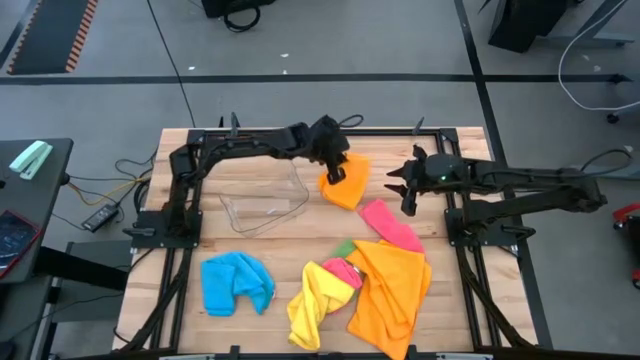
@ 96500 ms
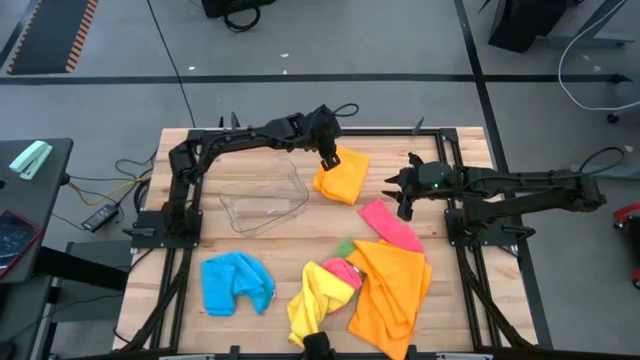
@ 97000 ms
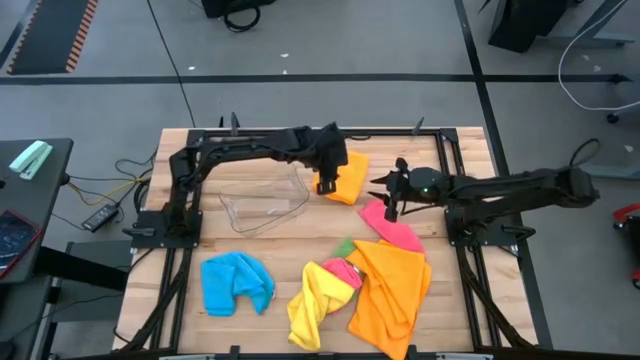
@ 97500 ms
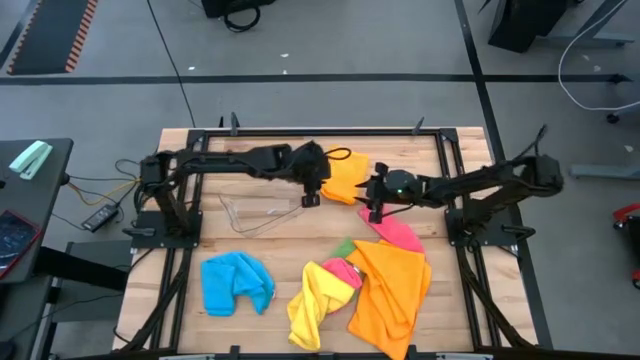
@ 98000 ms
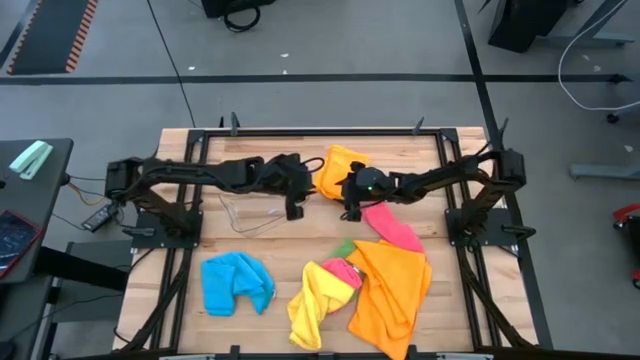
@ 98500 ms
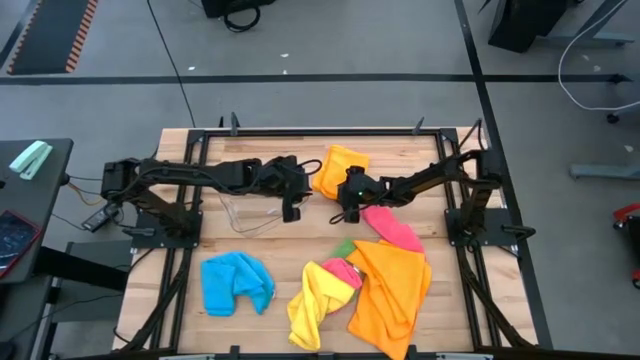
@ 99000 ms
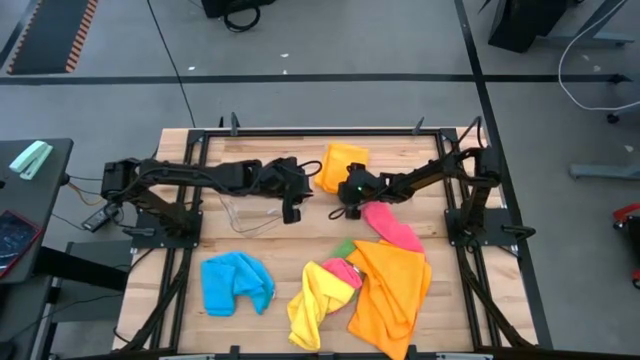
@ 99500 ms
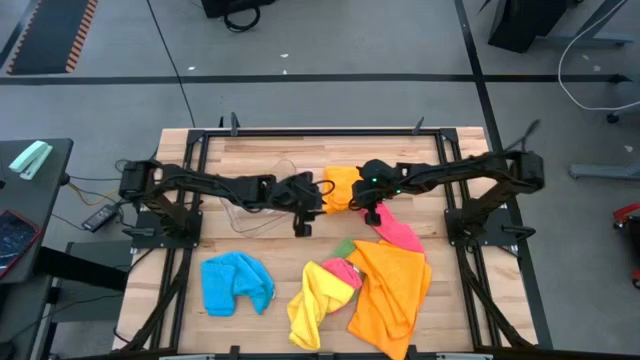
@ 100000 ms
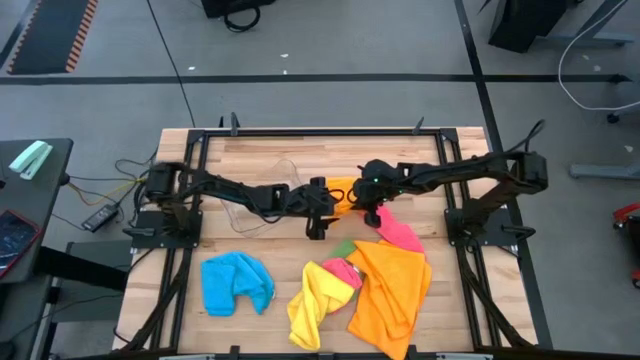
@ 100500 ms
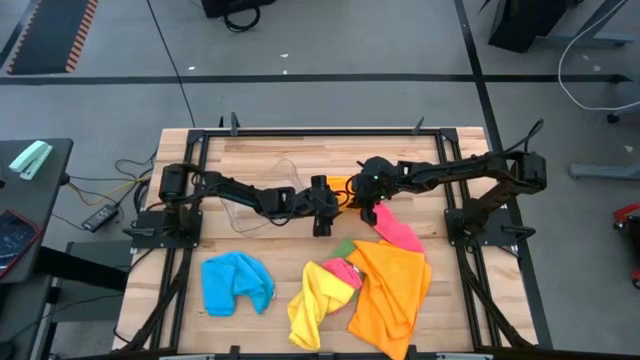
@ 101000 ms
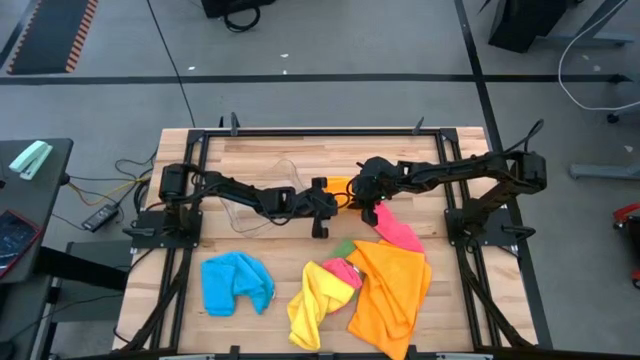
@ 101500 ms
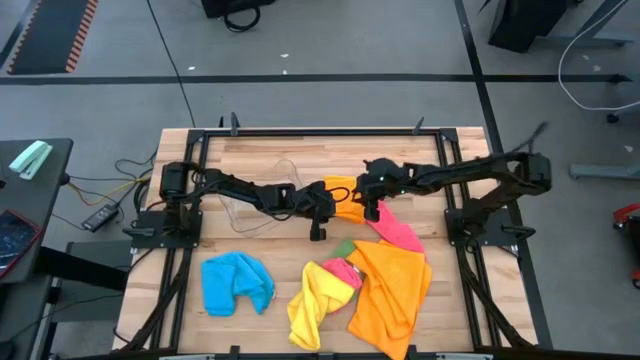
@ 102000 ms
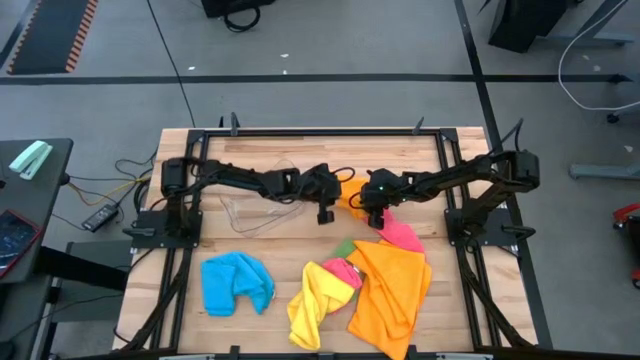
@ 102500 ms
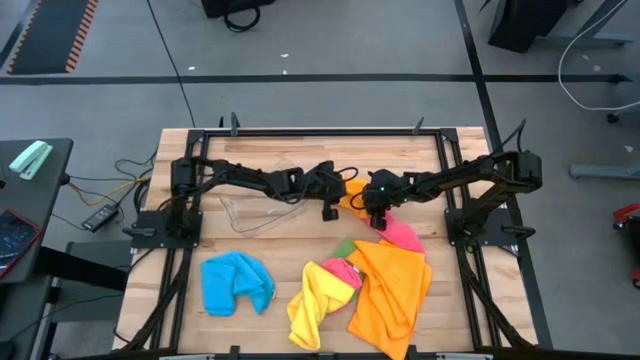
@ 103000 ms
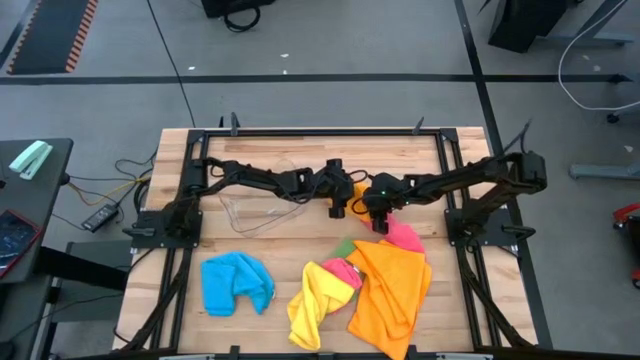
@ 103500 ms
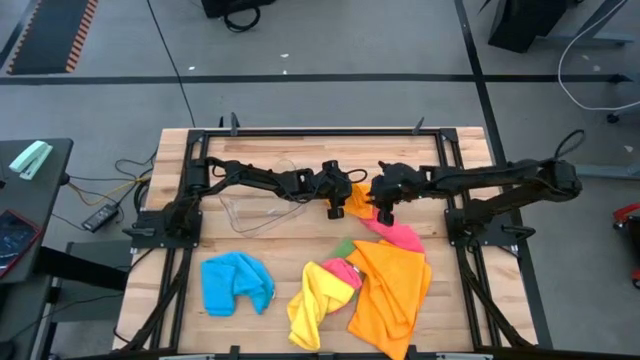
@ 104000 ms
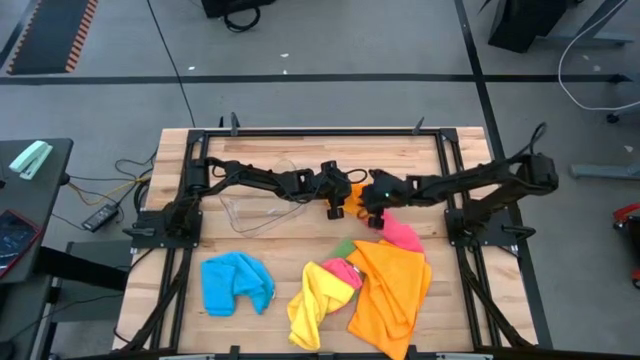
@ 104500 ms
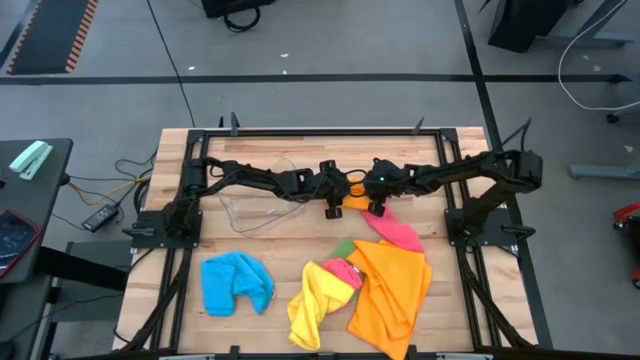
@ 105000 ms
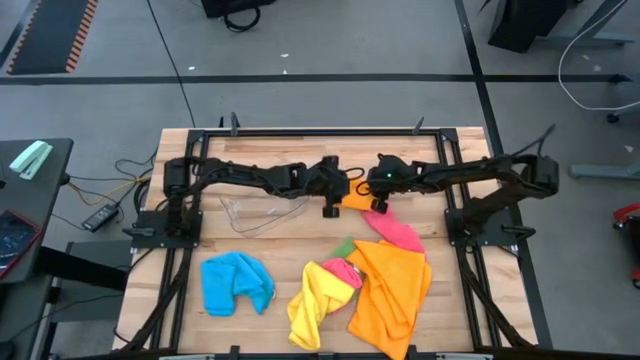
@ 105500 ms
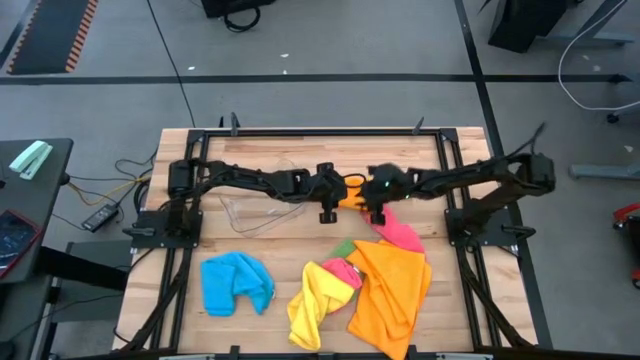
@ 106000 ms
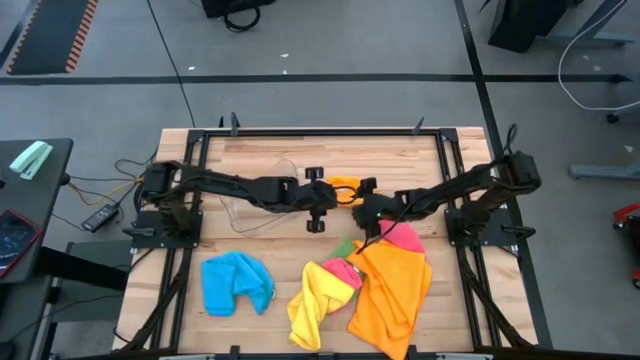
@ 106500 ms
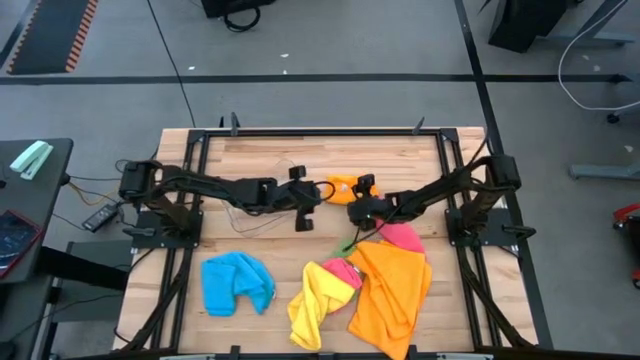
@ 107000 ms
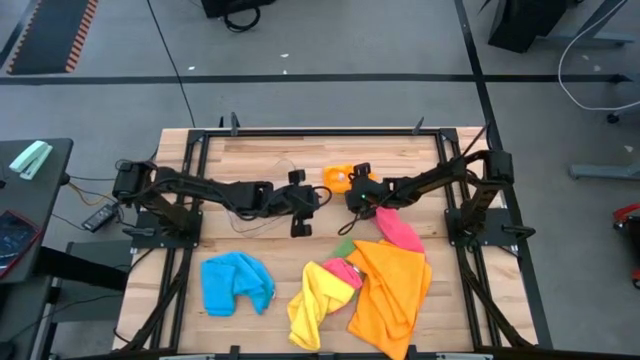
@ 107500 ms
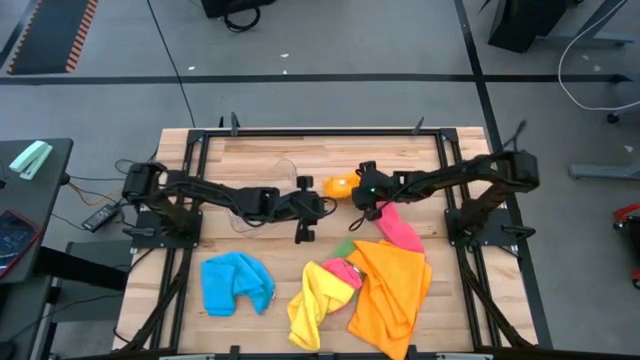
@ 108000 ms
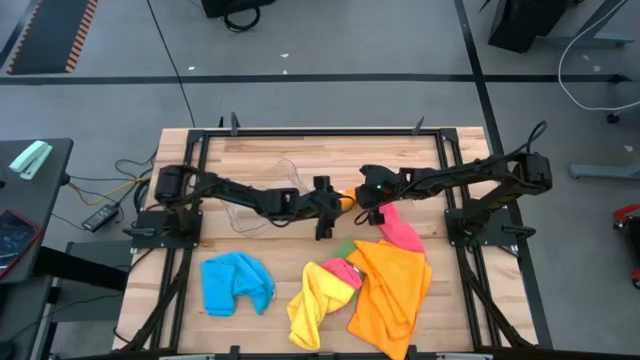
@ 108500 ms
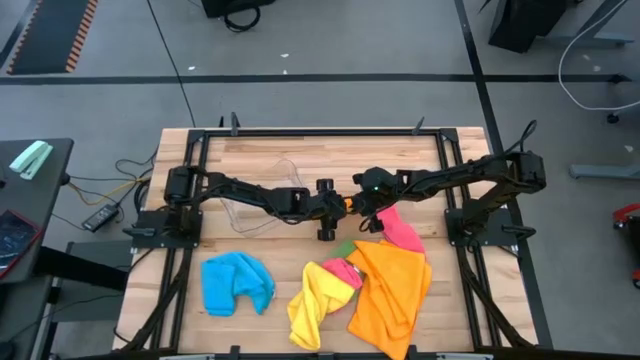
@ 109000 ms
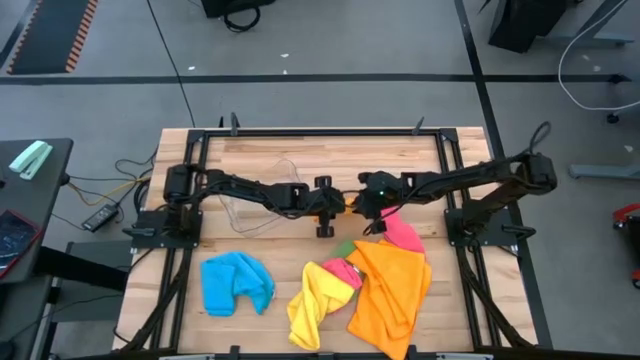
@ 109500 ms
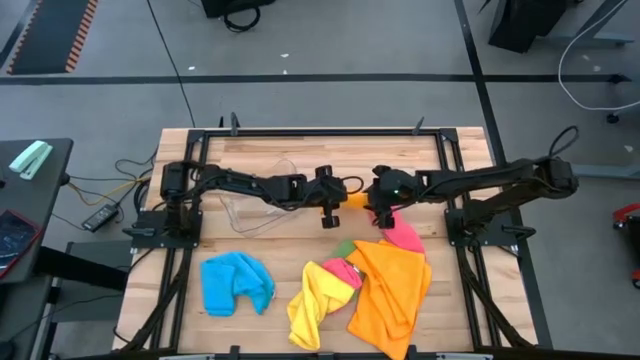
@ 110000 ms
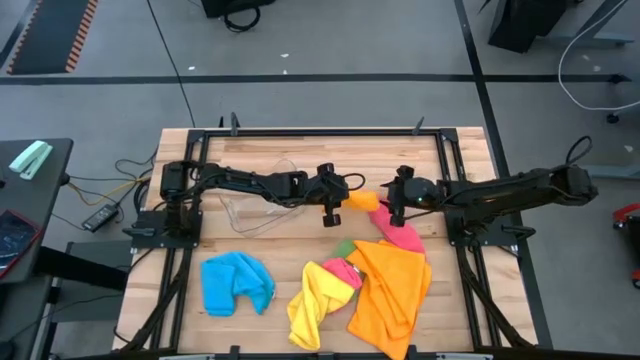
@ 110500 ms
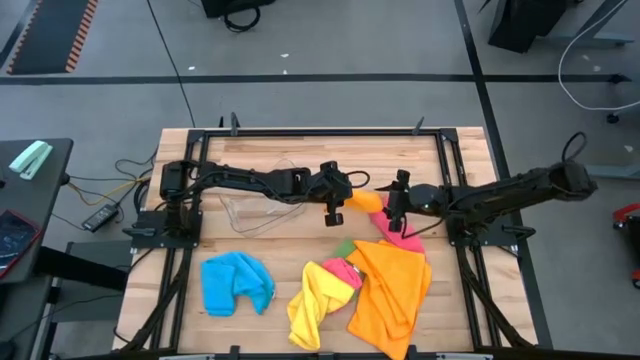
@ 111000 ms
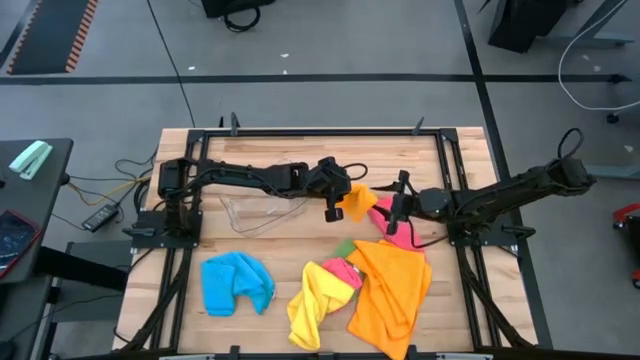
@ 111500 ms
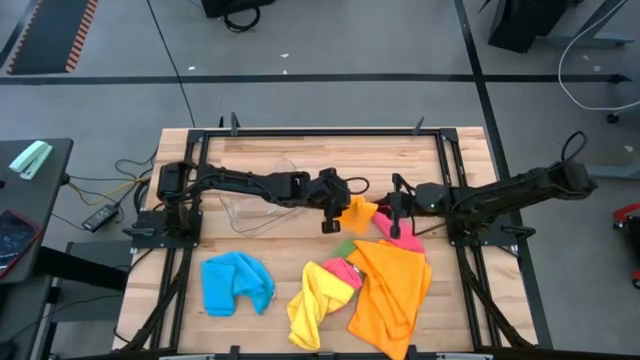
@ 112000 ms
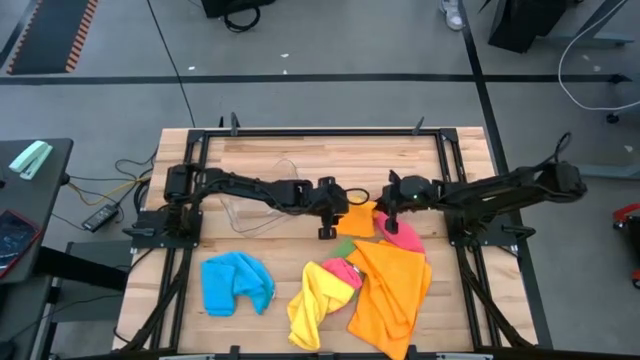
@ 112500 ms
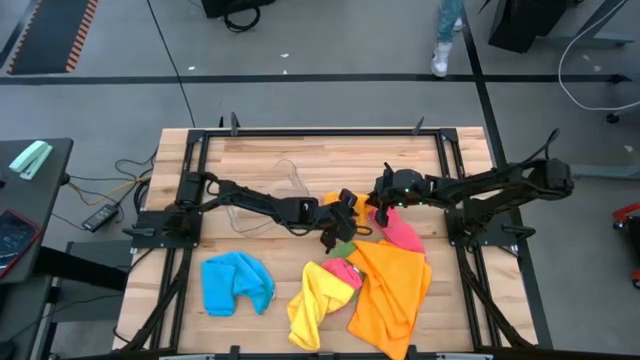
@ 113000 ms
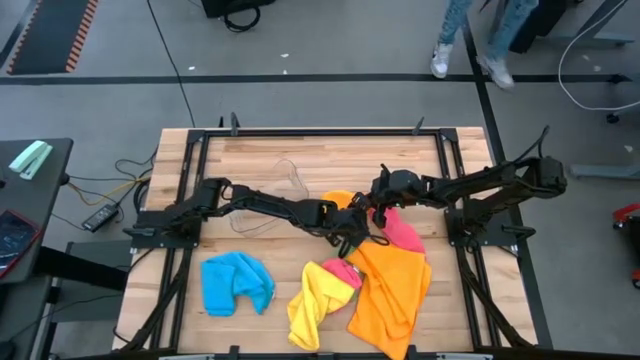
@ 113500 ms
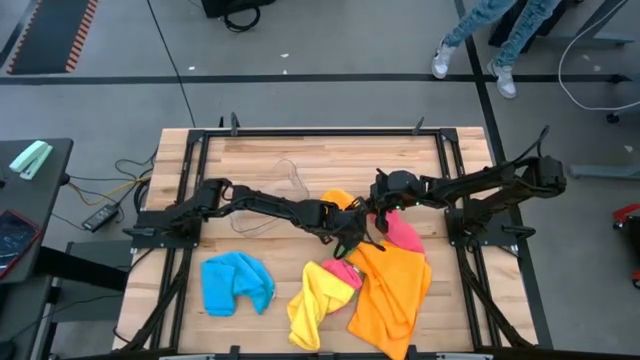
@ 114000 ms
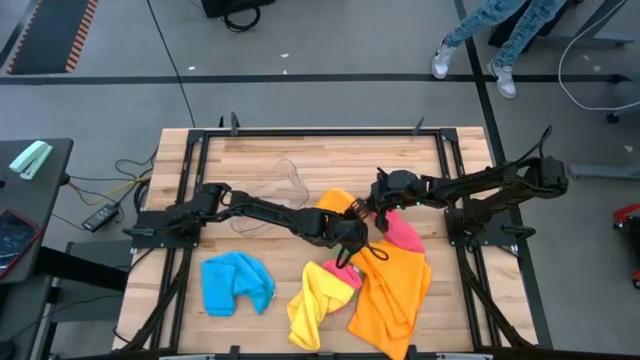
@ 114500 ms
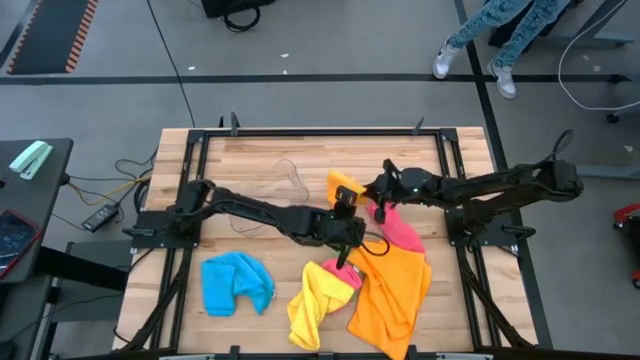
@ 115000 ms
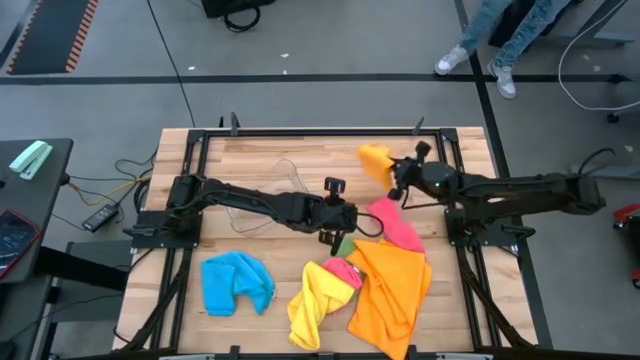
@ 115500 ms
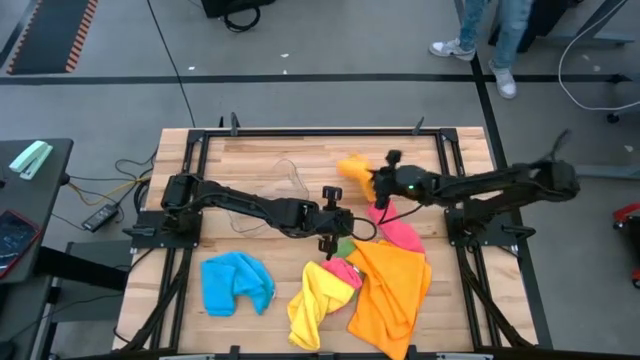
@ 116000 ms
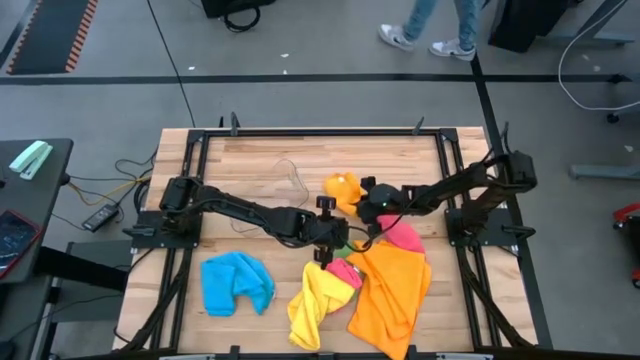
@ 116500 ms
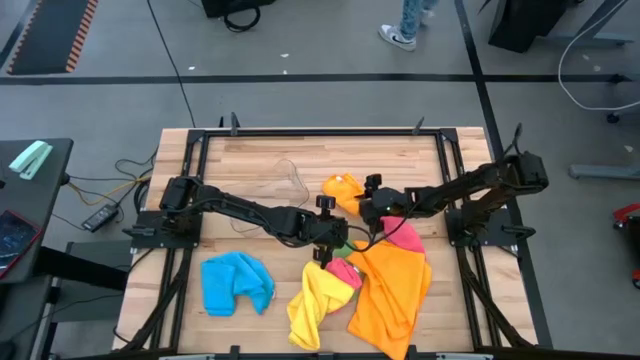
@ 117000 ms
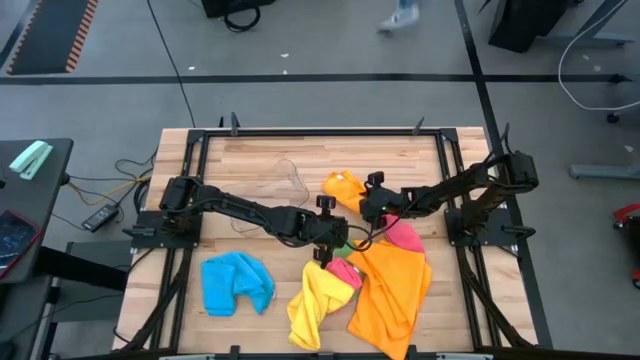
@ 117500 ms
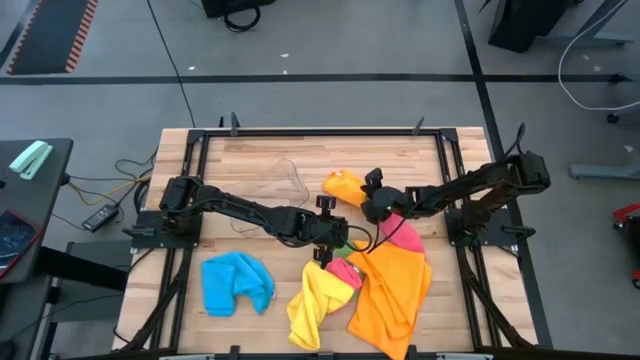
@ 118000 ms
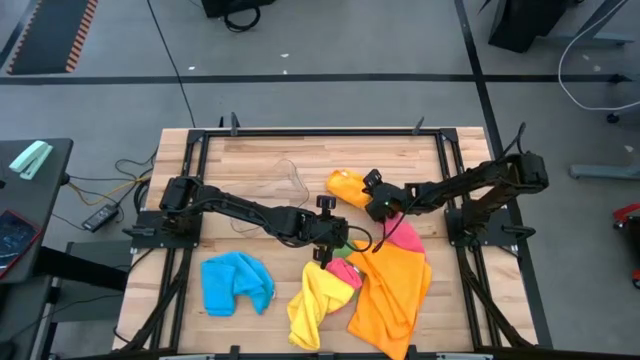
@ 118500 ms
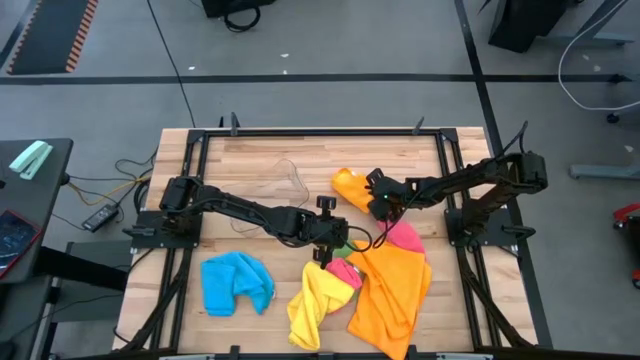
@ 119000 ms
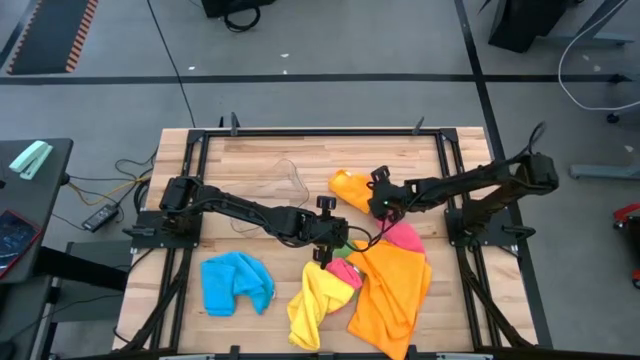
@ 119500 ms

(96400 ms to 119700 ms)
Task: Fold microfiber towels
Fold the orange microfiber towel
